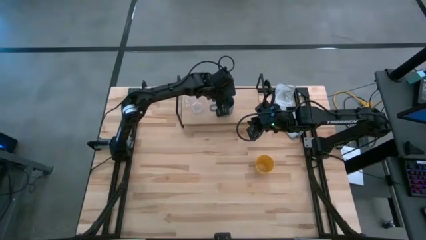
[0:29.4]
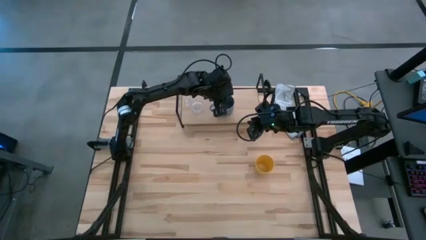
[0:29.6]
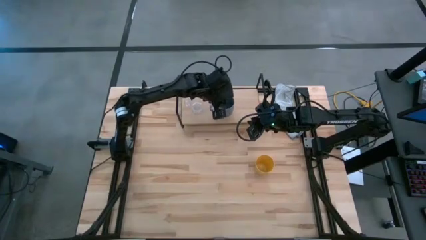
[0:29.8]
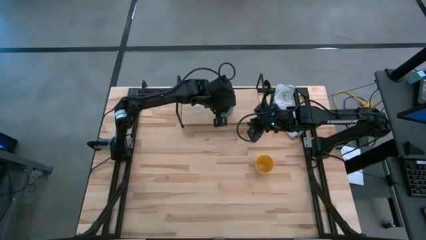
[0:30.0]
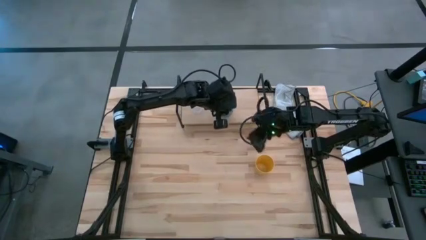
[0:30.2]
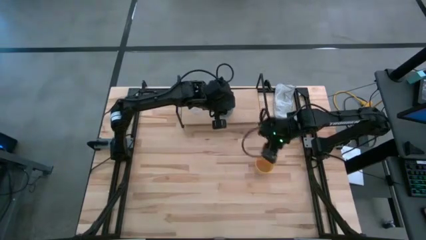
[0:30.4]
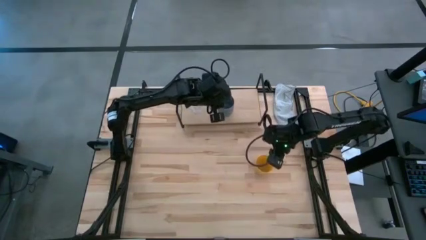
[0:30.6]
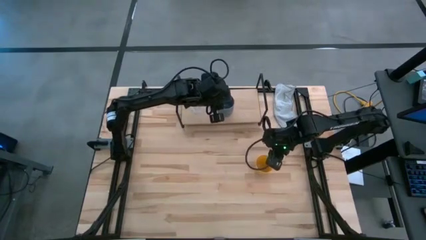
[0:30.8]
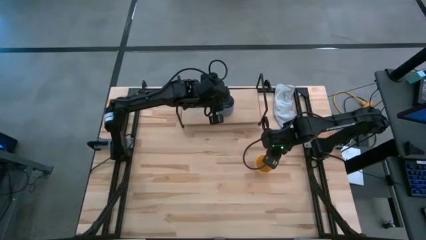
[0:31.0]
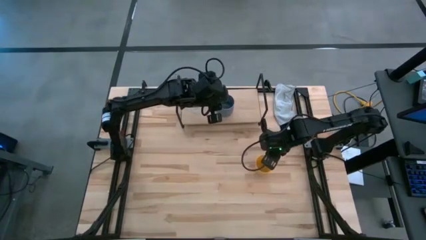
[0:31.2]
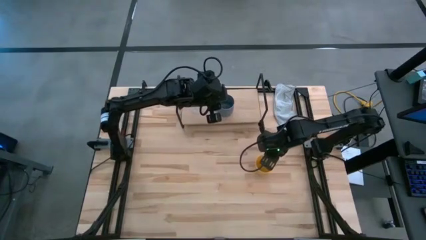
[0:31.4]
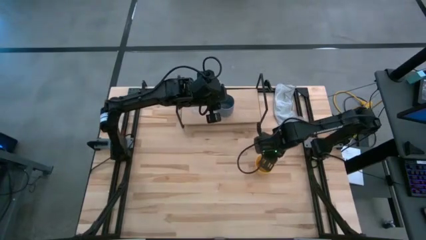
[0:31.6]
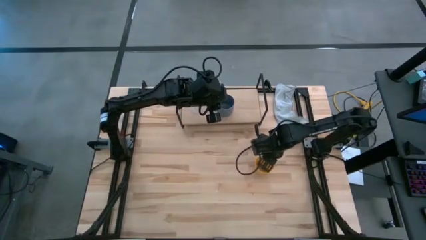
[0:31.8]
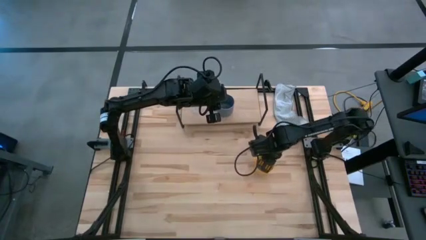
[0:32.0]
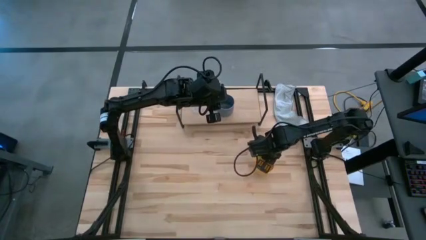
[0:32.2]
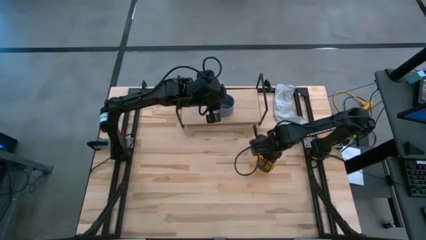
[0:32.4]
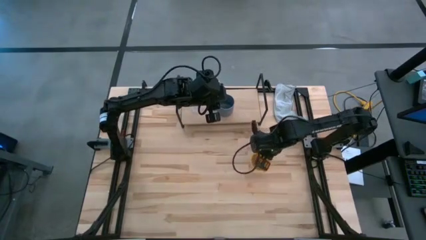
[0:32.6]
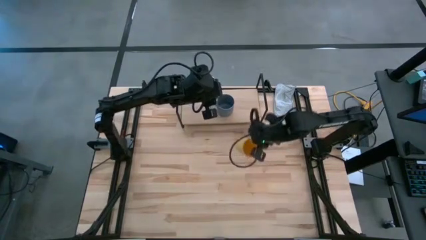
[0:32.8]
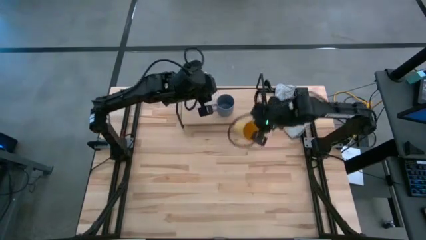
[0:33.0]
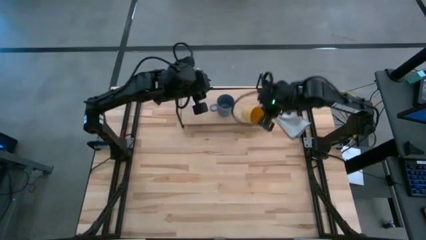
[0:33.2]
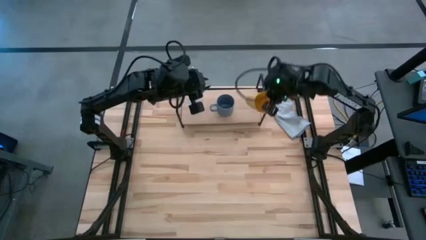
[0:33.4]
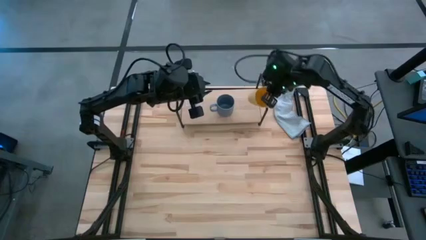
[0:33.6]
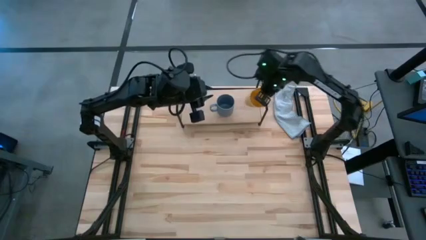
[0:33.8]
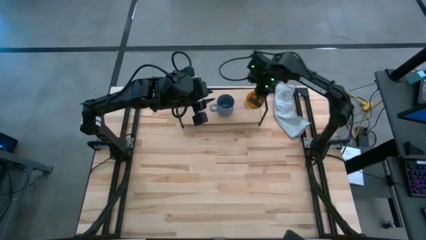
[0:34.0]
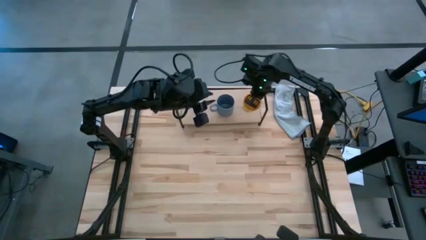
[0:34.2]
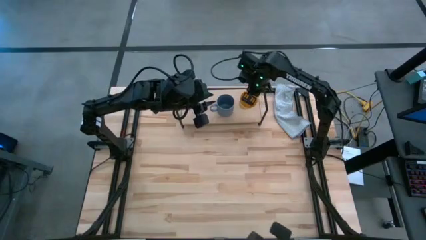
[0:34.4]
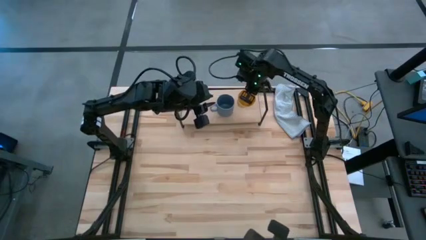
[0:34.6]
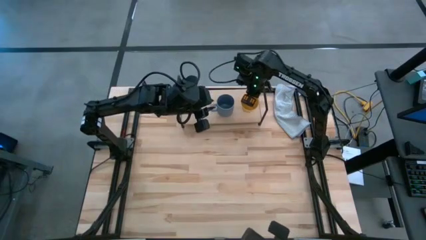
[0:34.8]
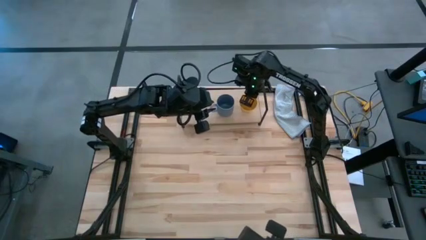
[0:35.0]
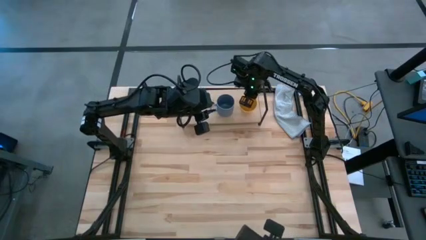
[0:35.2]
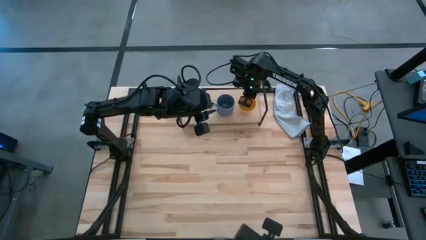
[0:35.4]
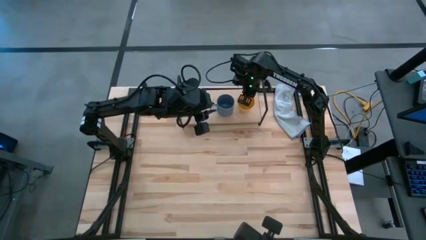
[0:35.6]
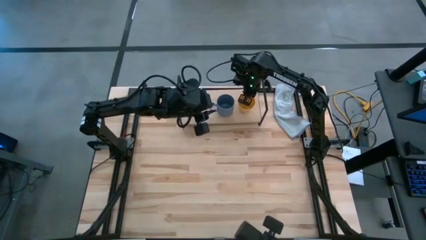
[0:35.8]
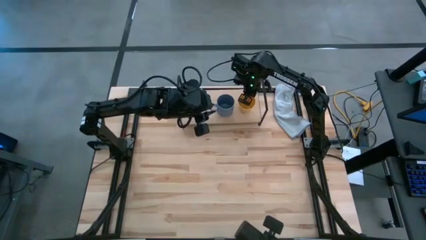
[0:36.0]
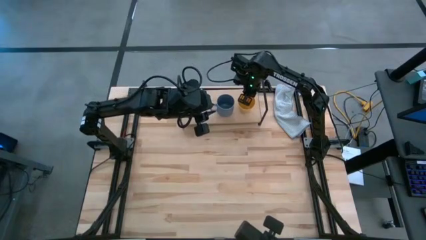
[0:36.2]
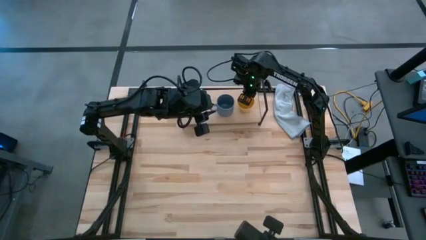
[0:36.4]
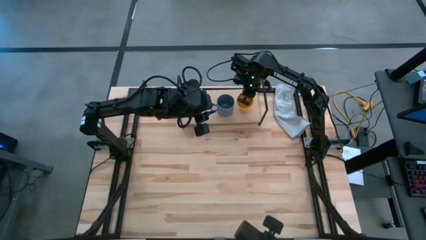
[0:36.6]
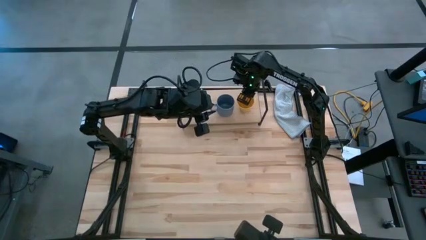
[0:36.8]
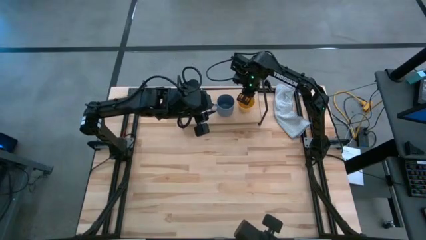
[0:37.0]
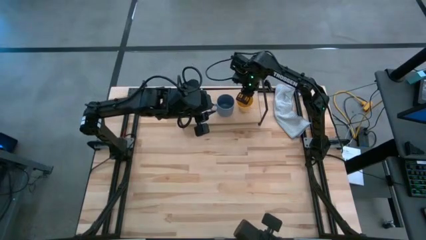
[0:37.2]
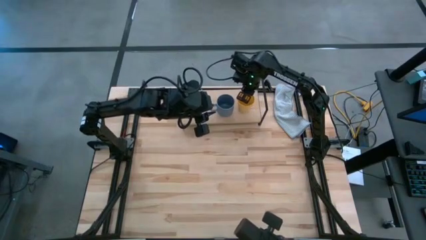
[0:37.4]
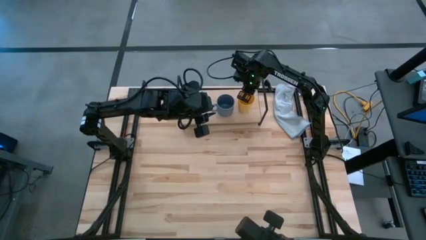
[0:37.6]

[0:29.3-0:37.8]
Task: Stack small to large cups/mugs on shelf
Put the yellow cup on the shelf

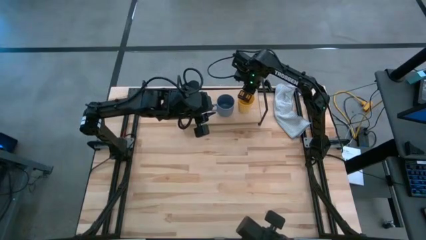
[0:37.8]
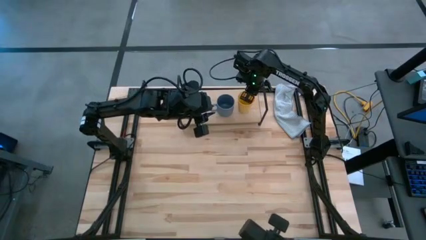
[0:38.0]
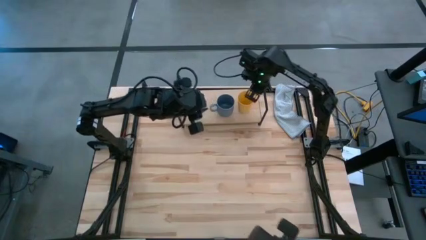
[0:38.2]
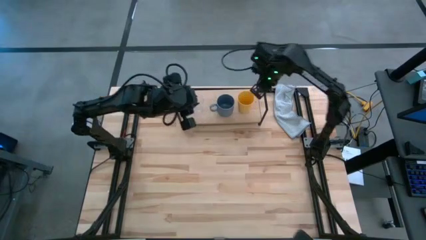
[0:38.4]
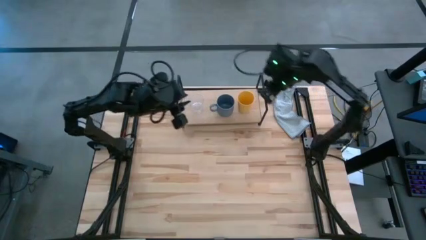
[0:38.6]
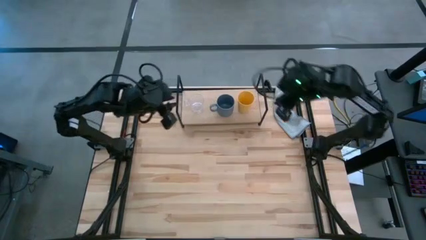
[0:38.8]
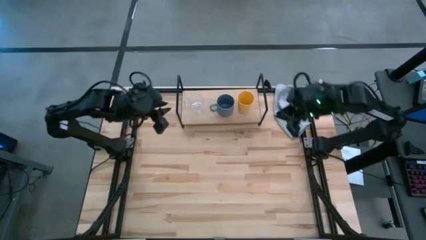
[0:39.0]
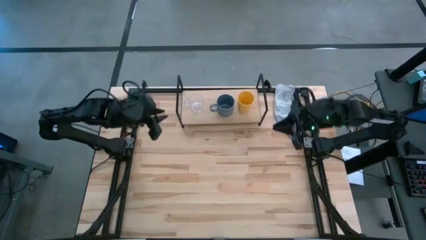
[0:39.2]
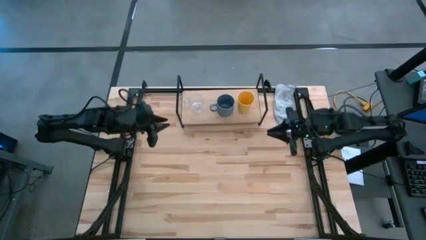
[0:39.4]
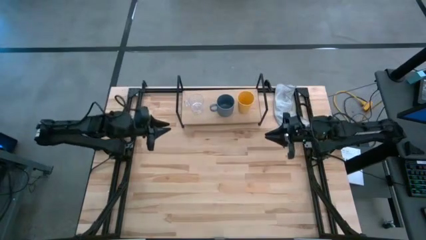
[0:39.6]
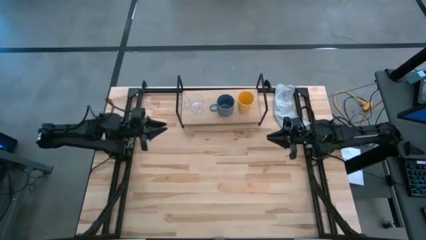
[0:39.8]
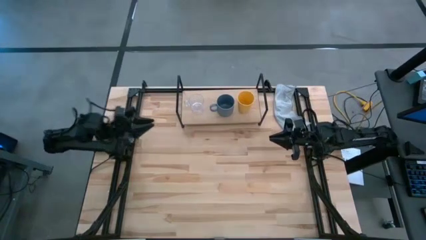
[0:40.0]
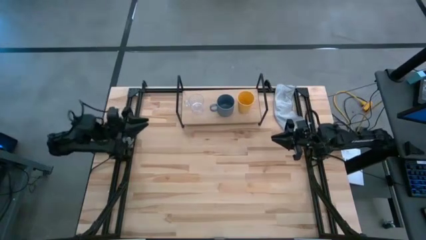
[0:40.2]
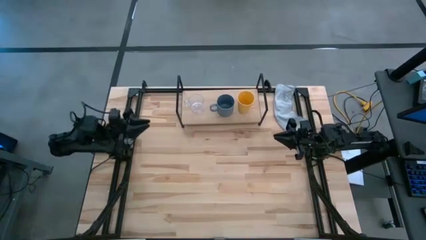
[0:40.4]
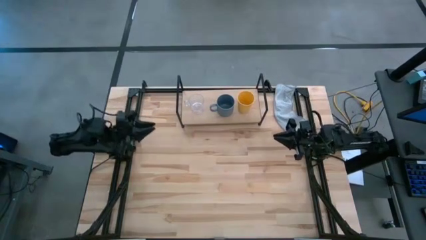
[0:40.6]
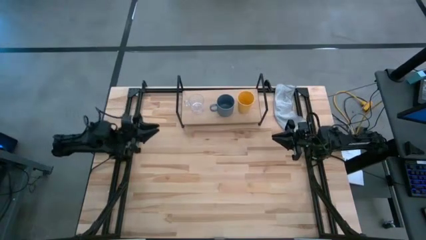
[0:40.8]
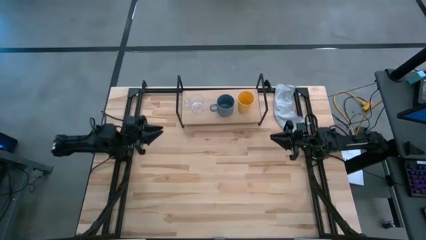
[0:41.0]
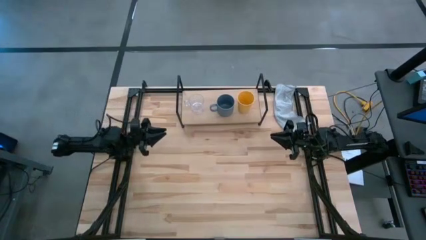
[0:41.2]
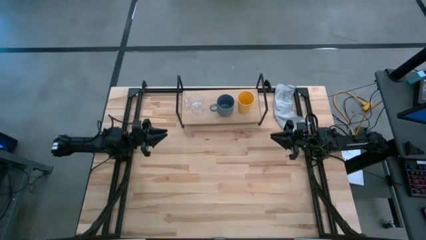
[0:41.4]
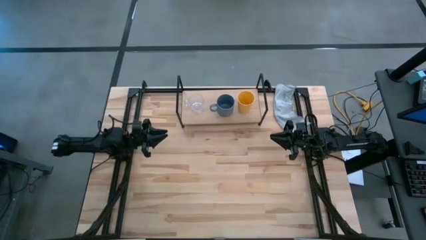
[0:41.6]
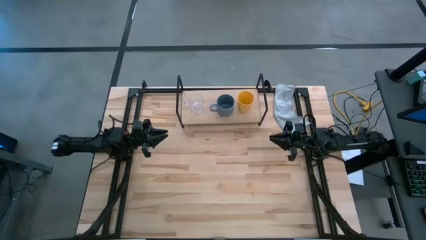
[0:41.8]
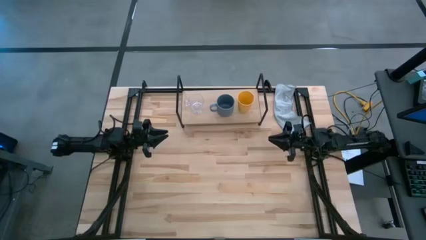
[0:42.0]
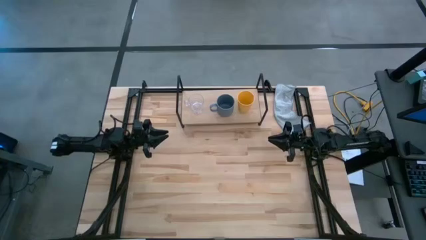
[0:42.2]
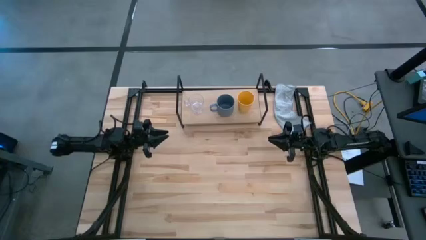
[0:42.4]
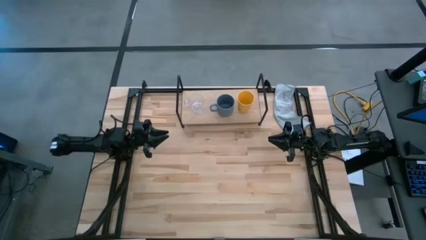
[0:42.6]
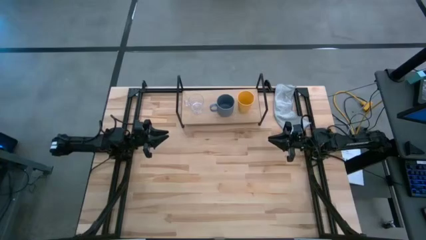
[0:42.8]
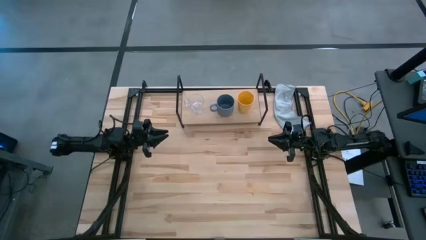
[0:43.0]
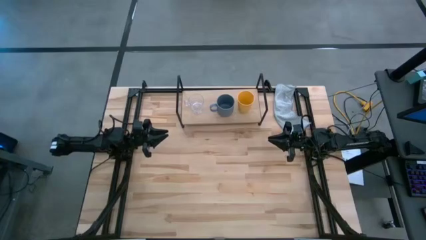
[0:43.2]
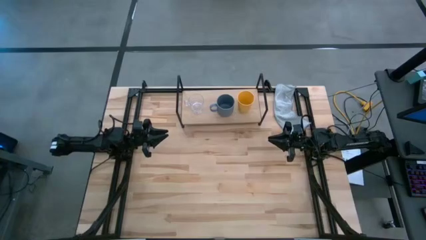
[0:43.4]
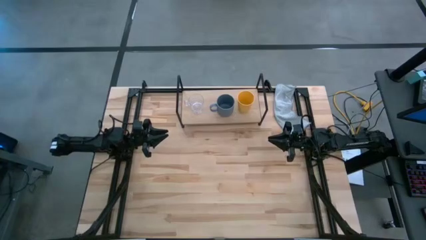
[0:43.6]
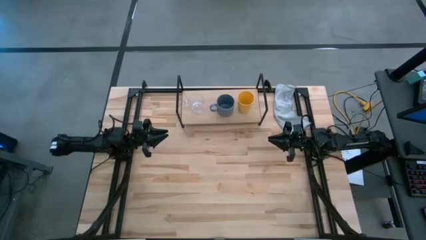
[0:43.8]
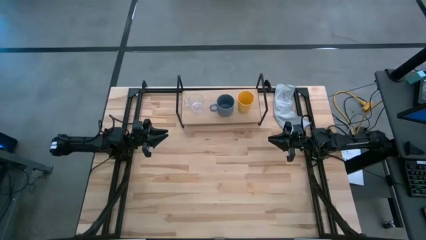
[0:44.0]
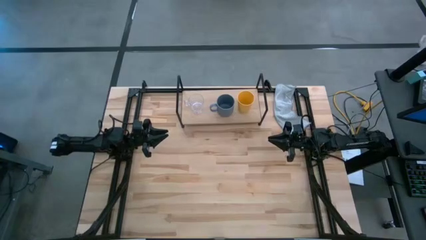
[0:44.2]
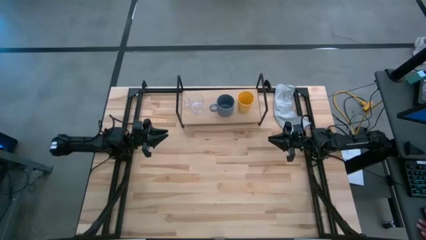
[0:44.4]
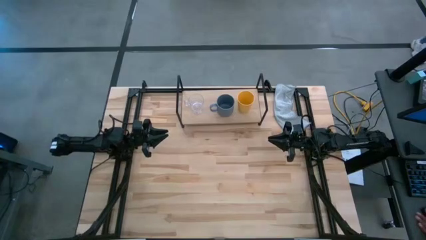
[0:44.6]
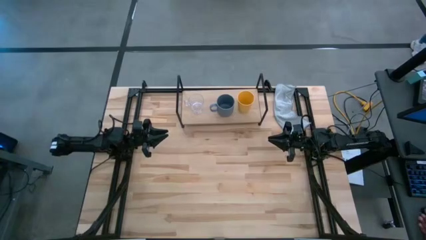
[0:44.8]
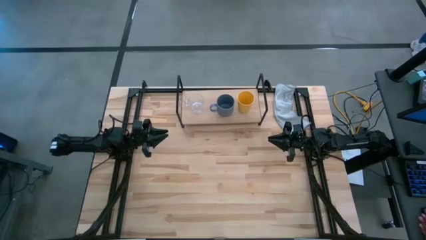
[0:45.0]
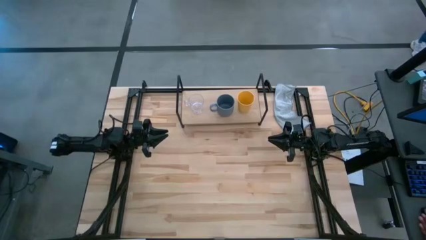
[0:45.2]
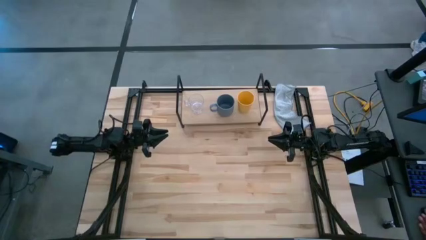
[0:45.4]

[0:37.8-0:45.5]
Return to Home Position
